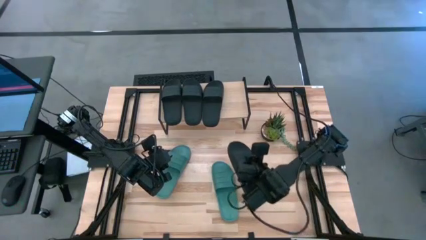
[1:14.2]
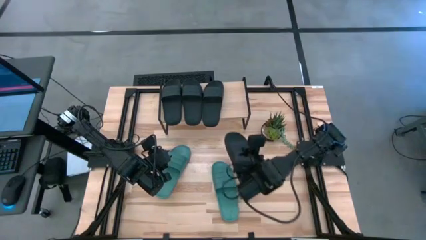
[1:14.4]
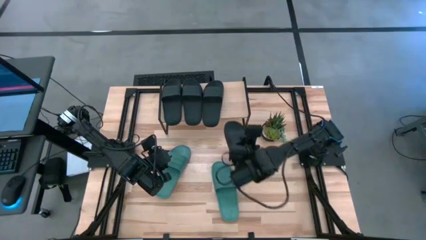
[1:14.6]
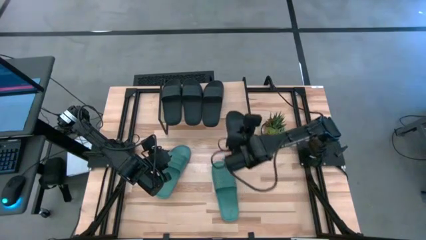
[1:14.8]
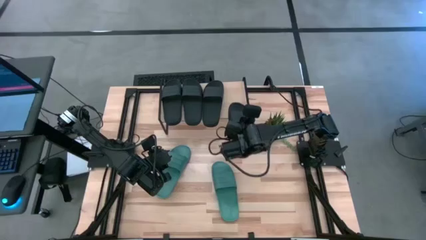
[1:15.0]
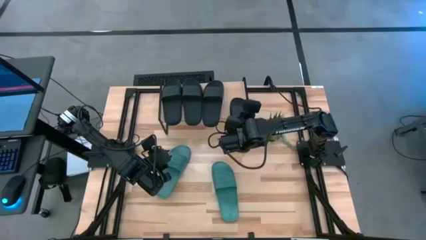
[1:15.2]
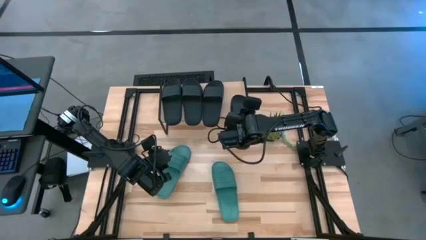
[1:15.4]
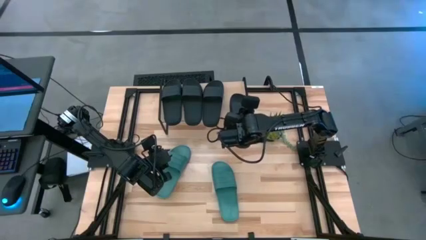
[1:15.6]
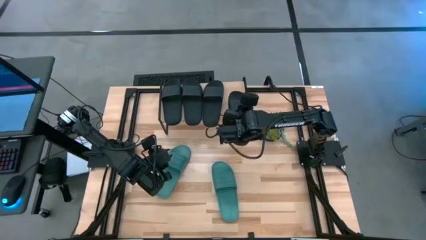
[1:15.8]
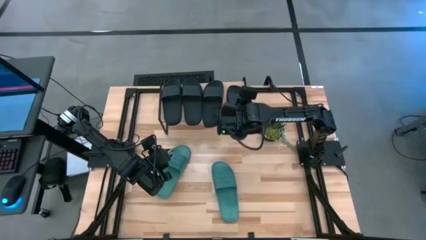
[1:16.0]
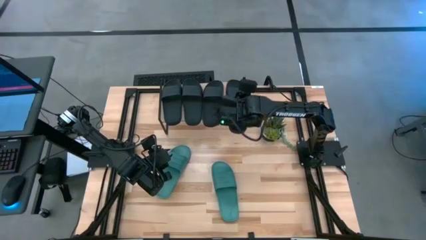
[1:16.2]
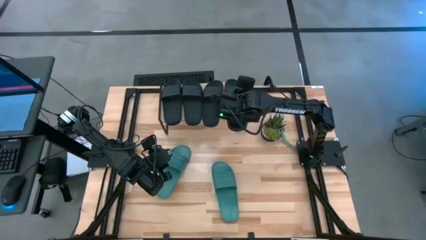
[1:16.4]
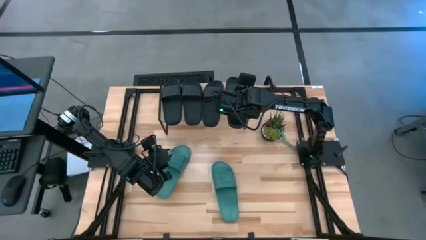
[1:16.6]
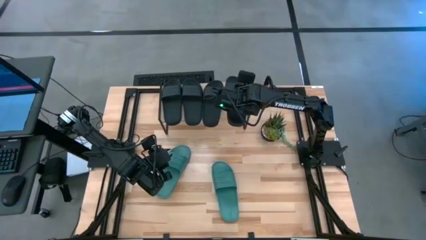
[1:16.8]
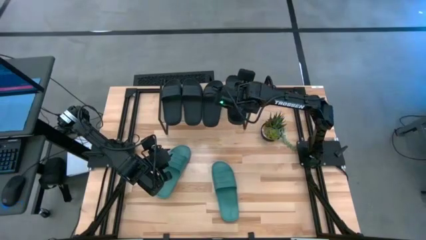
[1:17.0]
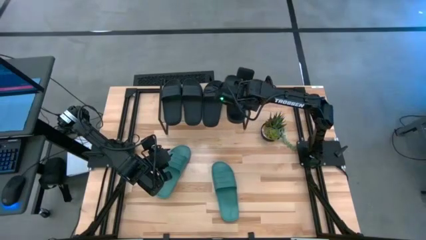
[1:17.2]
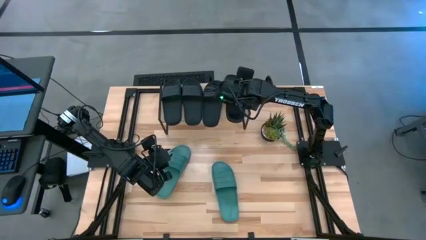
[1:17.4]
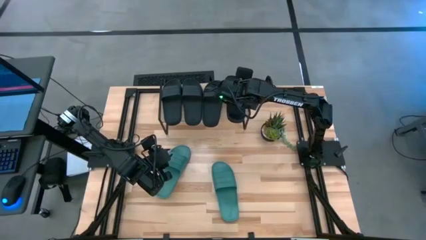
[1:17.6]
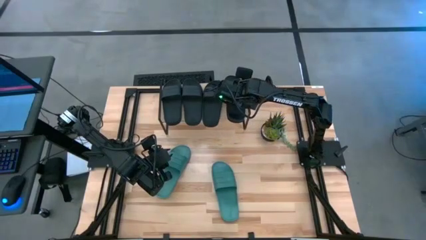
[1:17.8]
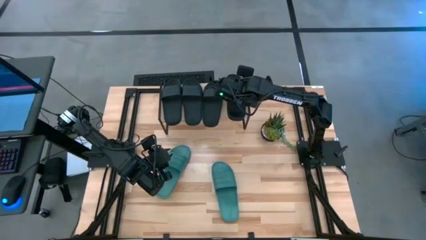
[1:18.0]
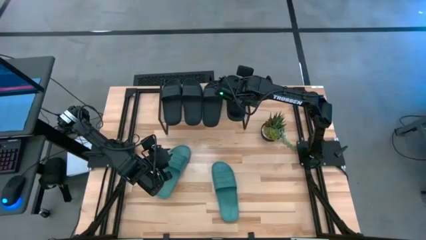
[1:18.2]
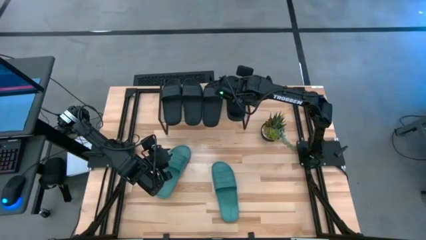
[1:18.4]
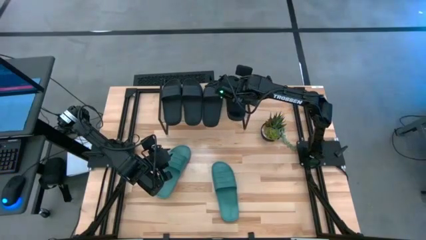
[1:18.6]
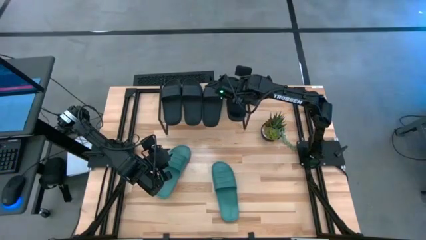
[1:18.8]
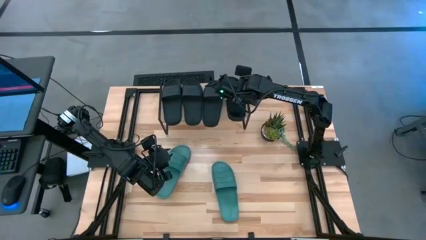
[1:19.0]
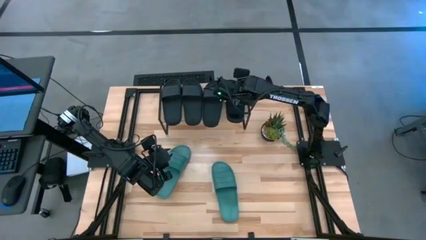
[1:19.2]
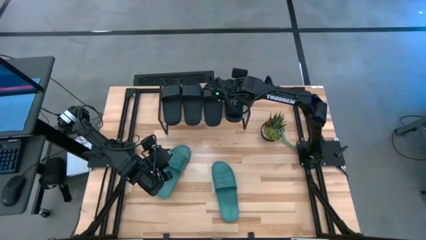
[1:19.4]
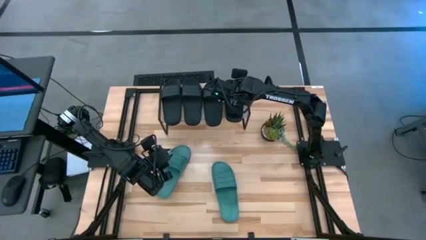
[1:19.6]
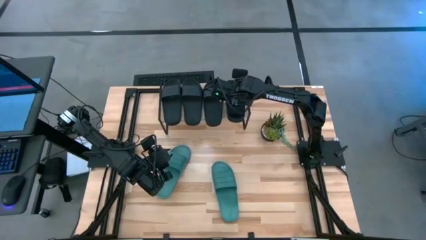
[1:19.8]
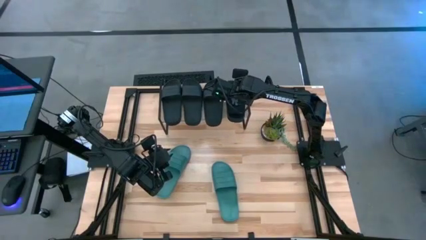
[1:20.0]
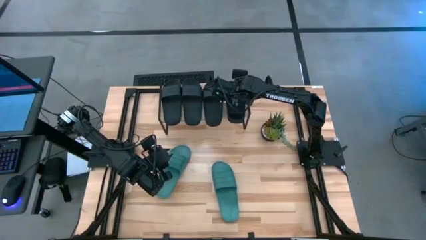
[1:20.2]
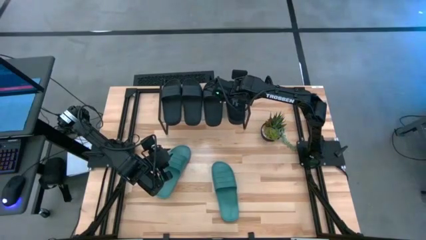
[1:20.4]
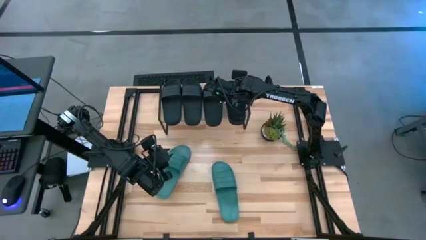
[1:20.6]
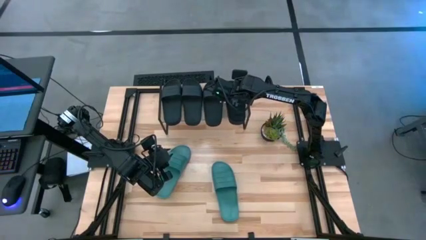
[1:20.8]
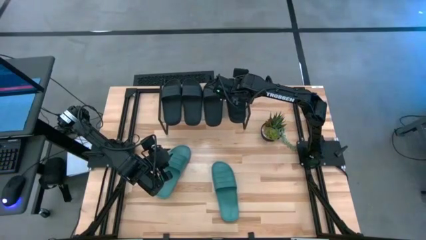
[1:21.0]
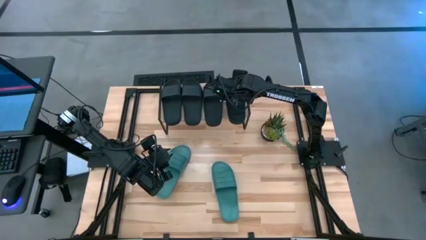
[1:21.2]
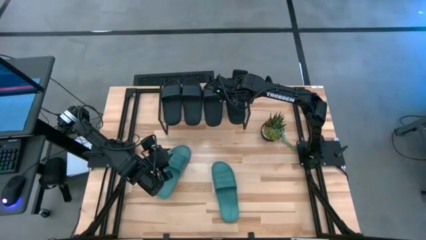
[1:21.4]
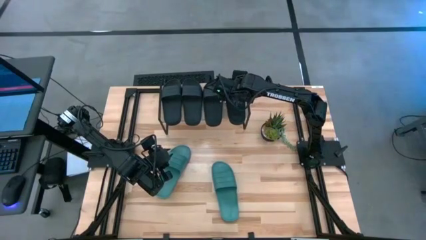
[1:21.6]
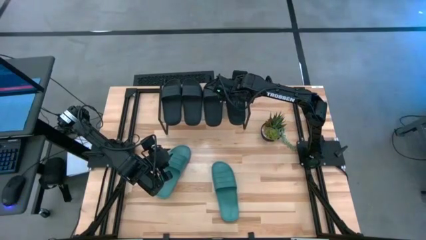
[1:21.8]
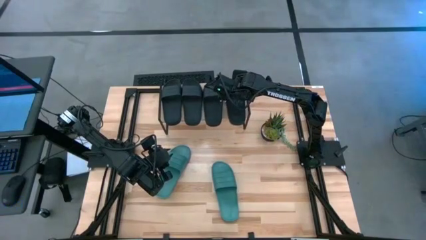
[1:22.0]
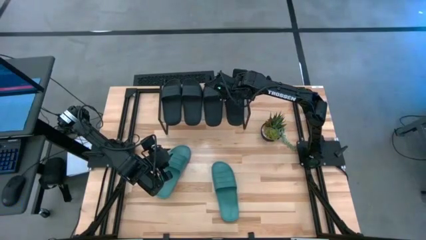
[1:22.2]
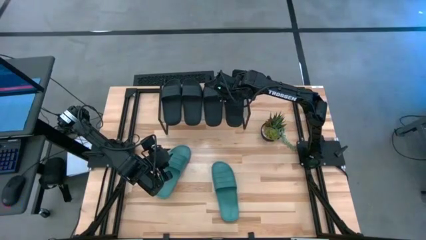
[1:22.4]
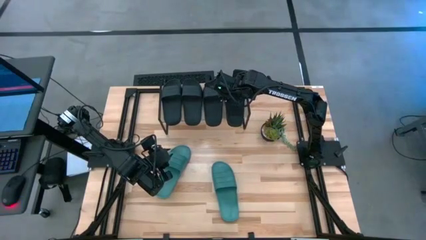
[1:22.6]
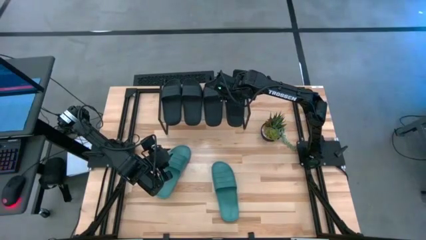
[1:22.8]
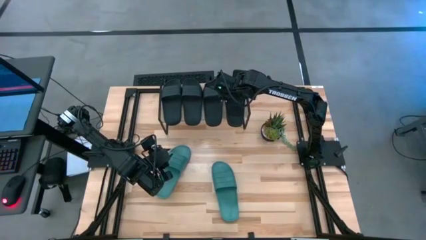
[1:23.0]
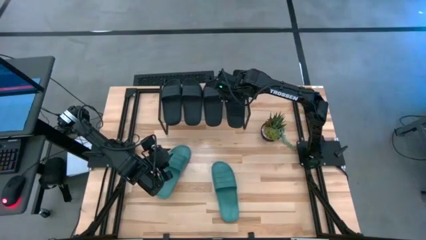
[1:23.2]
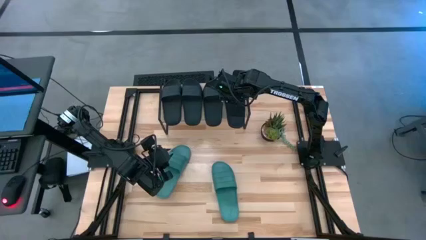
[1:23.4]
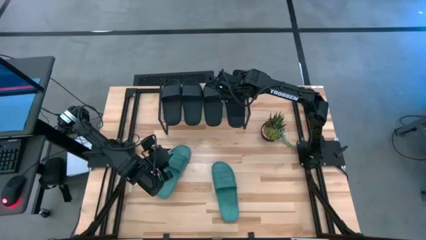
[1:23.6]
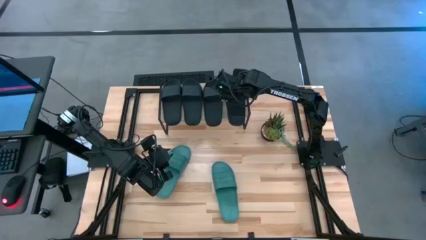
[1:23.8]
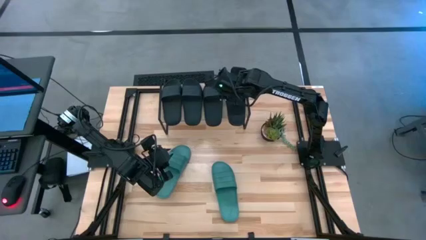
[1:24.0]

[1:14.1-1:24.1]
Task: Pick and place slides into the shelf
Put the black slide on the shelf

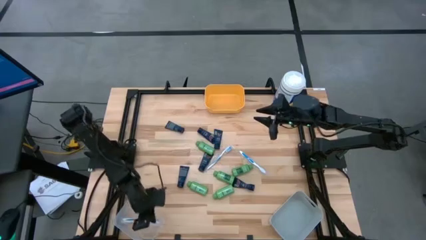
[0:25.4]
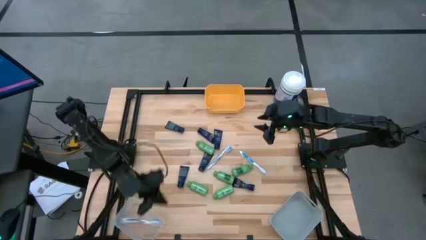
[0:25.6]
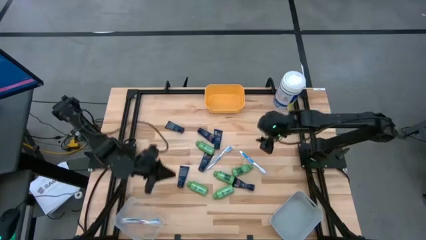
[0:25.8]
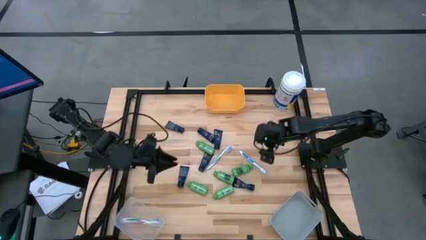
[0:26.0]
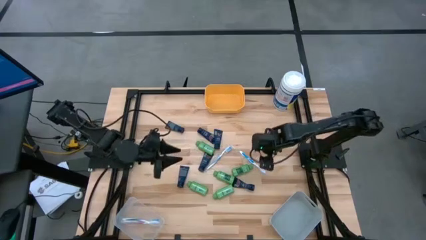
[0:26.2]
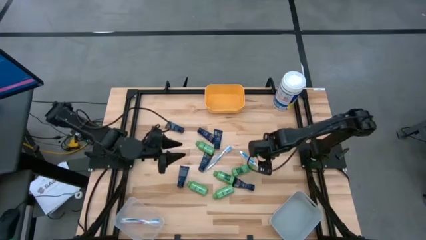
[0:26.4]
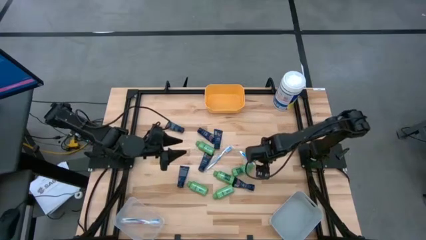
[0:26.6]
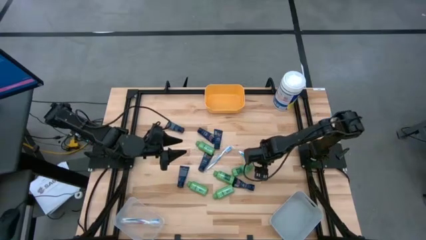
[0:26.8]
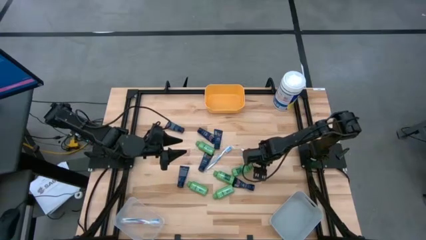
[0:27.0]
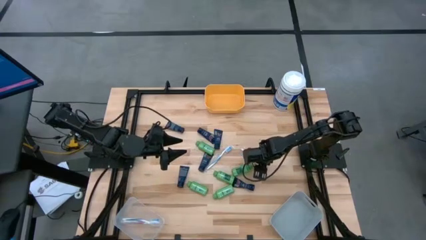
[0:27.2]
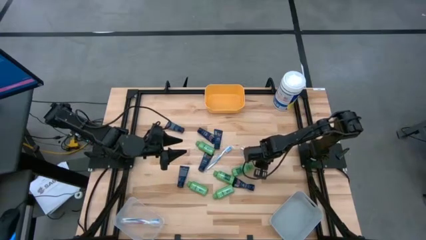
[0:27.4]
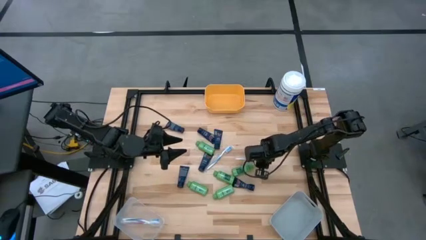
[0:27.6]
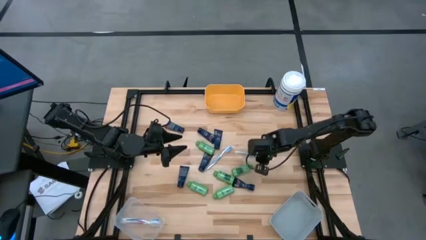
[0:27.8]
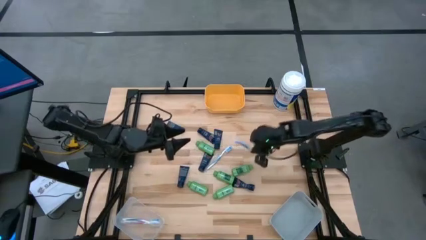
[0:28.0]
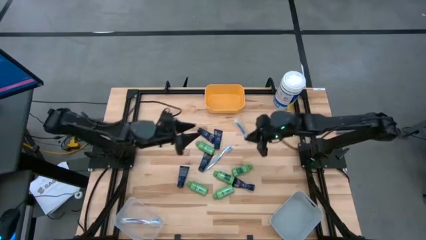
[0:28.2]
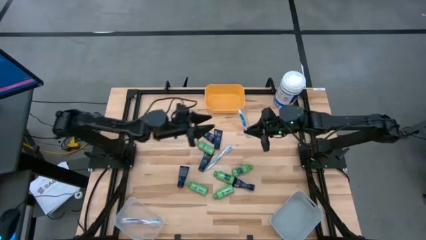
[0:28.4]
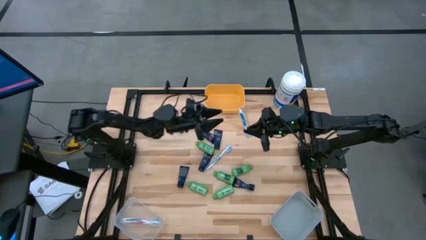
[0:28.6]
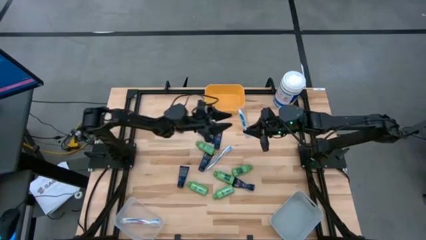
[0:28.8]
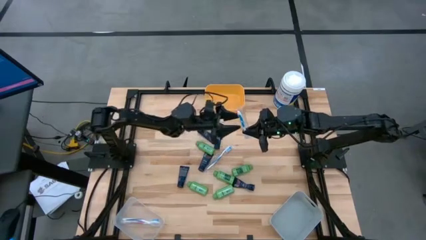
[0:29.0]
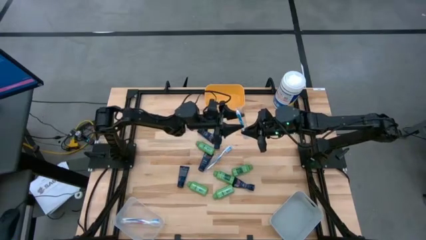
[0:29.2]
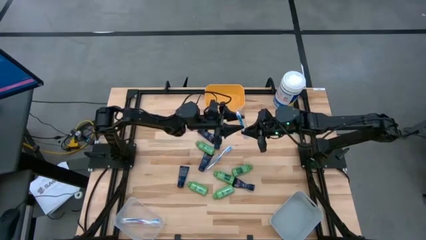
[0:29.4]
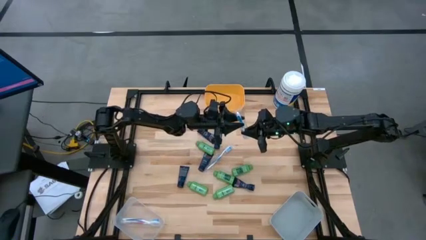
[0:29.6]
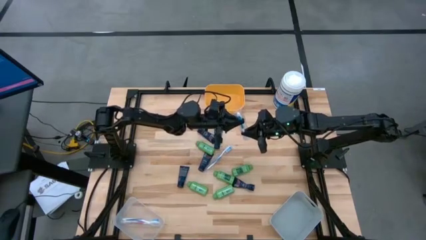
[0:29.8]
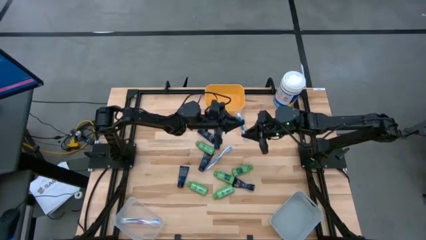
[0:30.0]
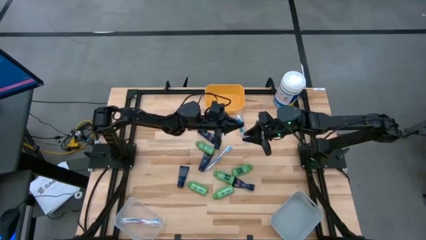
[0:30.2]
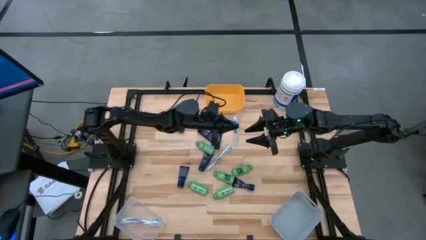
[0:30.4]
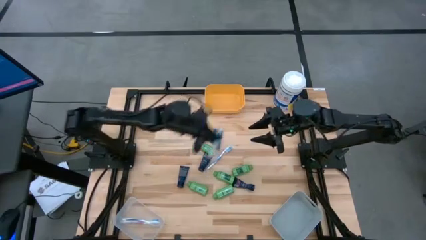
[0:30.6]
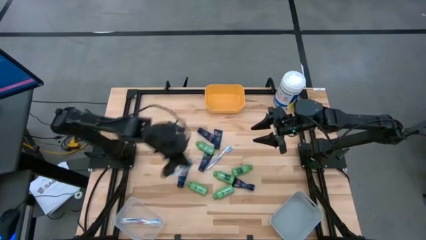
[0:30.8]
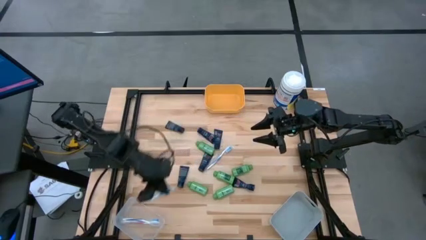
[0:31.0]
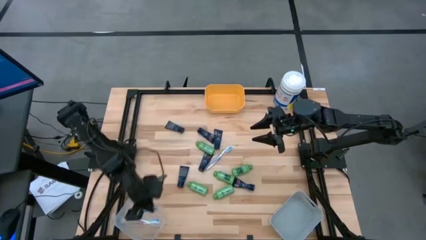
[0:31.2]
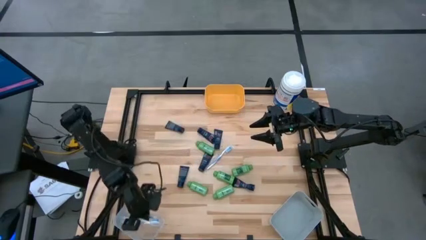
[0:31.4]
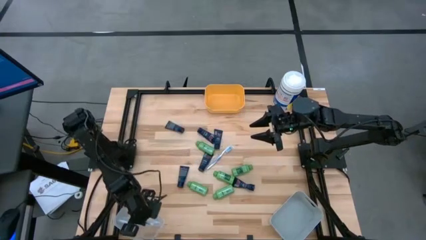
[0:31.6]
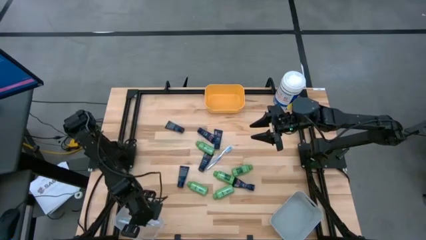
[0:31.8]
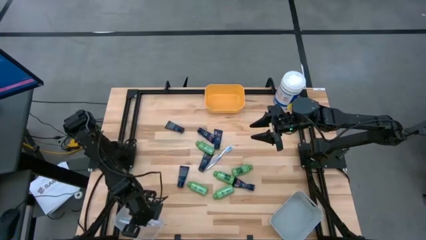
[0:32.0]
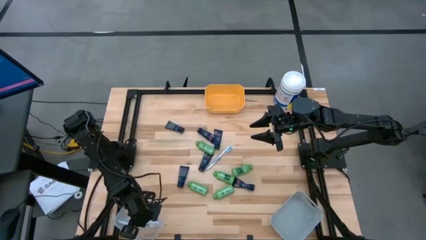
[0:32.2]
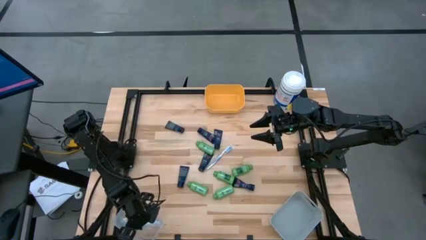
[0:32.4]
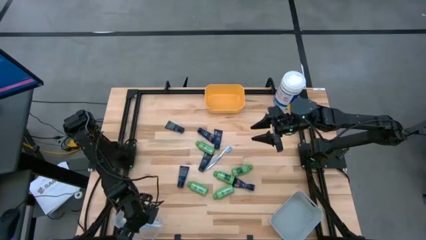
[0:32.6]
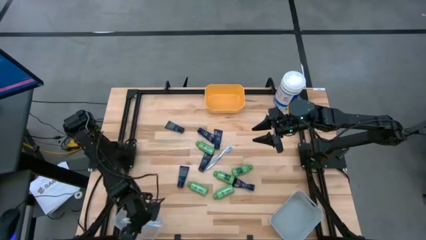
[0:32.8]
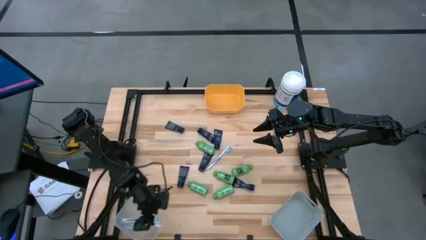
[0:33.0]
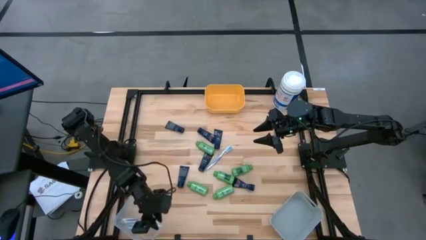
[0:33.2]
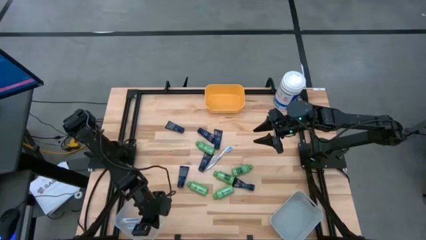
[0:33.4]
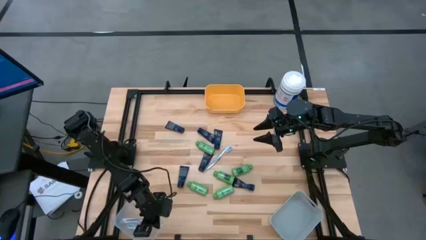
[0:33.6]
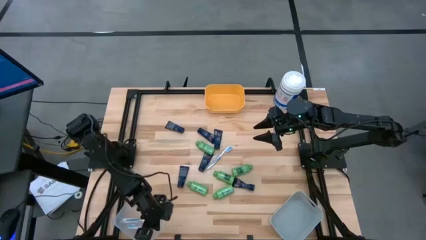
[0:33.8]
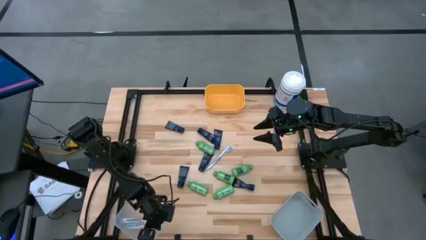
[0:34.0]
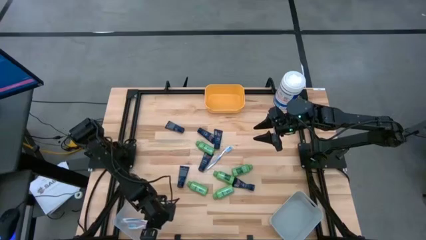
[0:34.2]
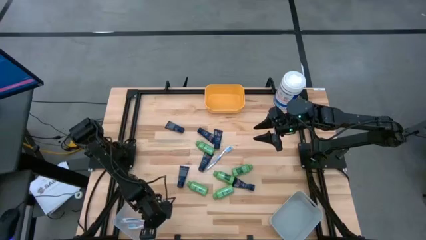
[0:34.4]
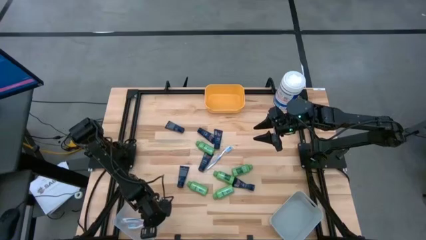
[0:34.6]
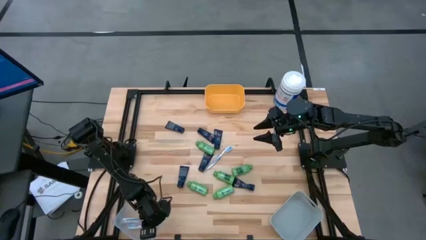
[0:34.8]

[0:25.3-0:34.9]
Task: Pick & Place Travel size toiletries
Put the light blue toothbrush into the transparent bin
